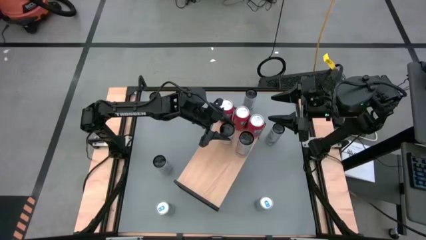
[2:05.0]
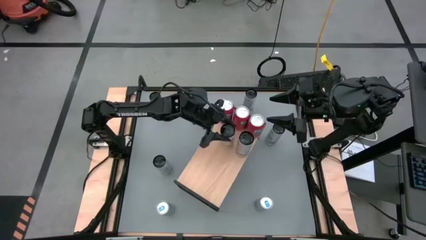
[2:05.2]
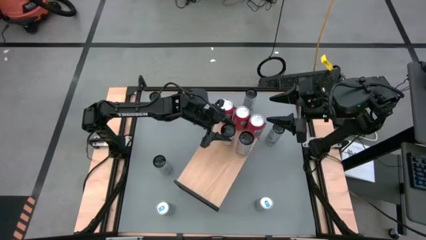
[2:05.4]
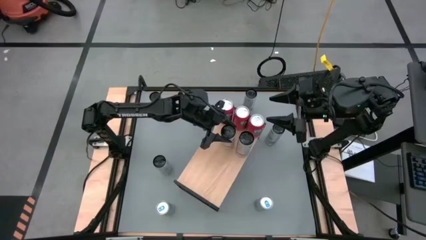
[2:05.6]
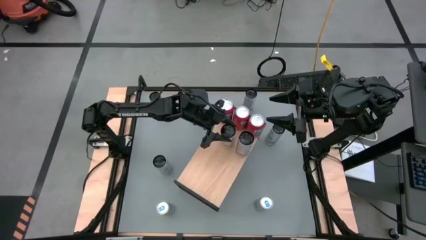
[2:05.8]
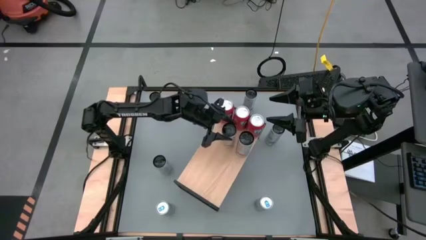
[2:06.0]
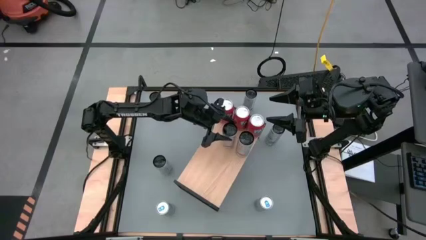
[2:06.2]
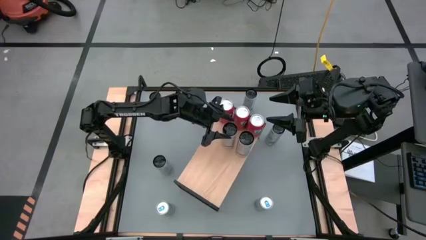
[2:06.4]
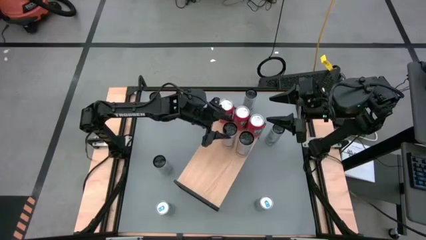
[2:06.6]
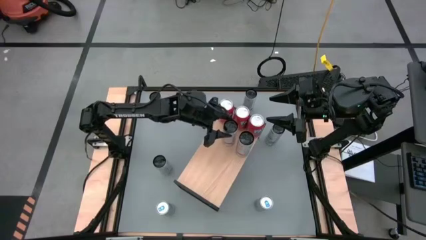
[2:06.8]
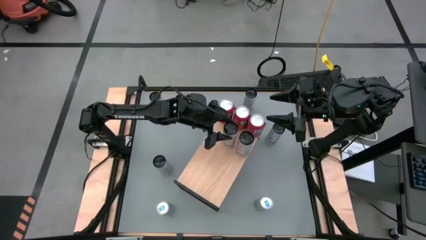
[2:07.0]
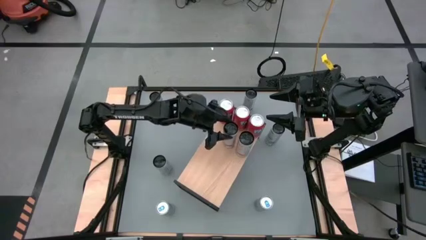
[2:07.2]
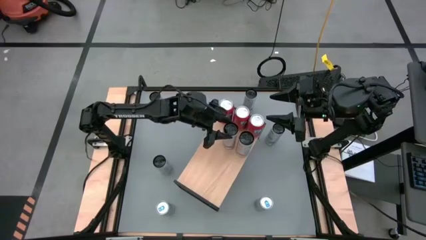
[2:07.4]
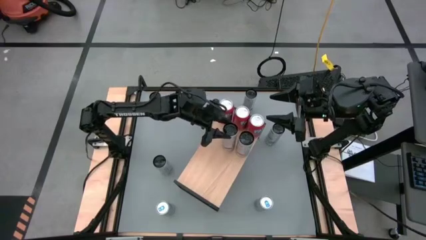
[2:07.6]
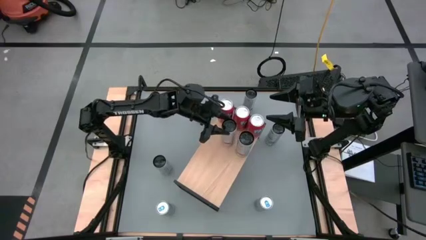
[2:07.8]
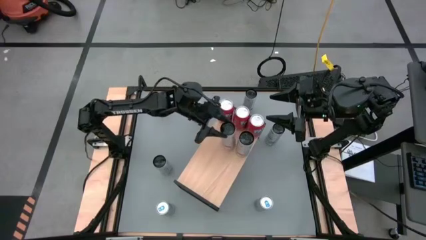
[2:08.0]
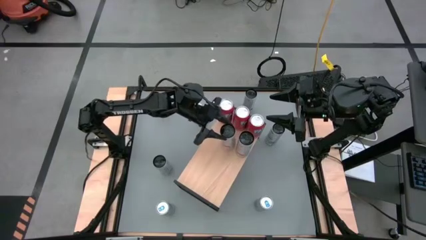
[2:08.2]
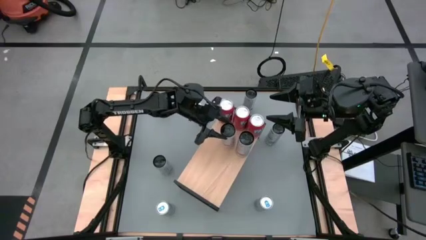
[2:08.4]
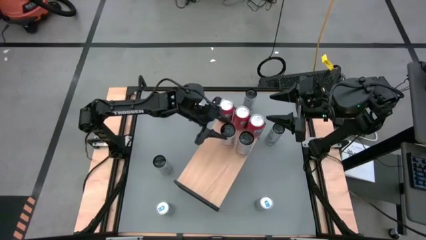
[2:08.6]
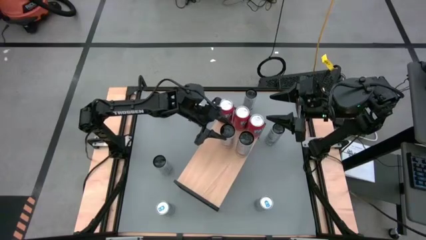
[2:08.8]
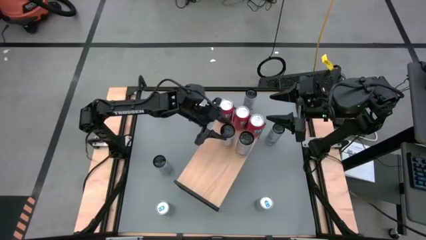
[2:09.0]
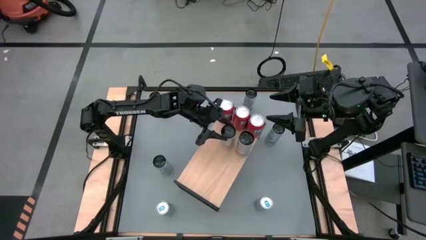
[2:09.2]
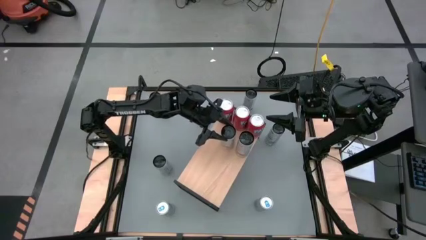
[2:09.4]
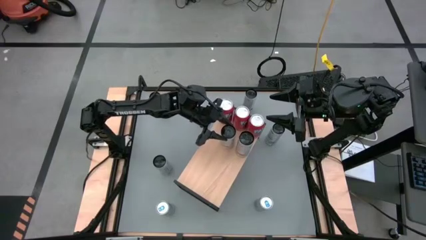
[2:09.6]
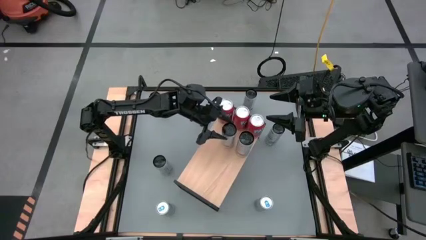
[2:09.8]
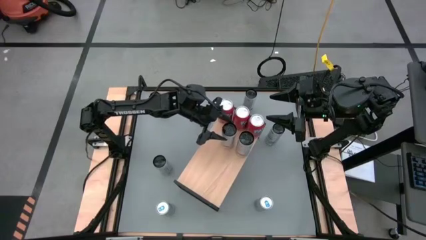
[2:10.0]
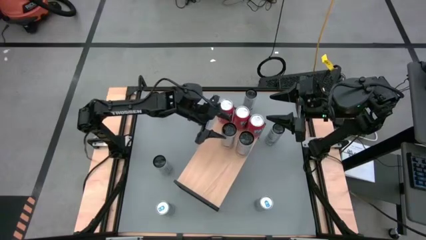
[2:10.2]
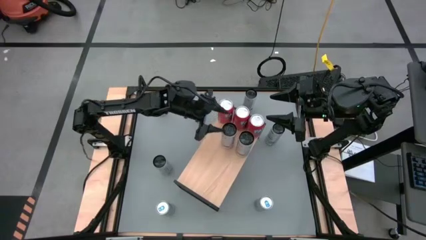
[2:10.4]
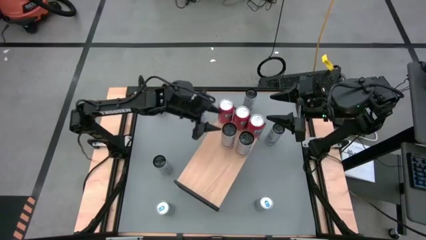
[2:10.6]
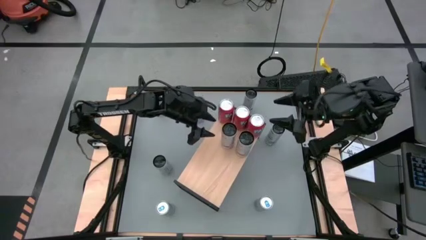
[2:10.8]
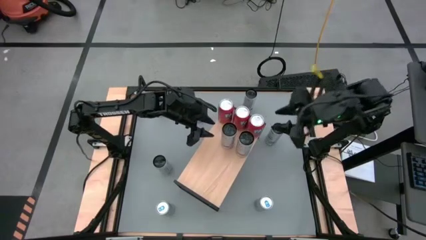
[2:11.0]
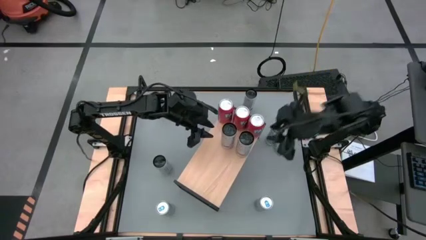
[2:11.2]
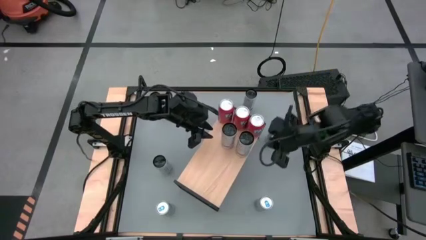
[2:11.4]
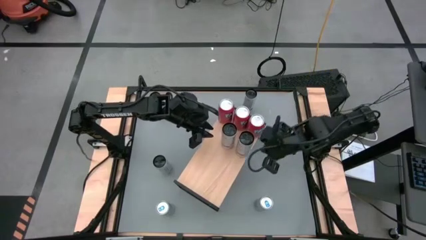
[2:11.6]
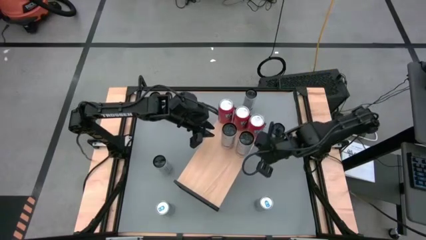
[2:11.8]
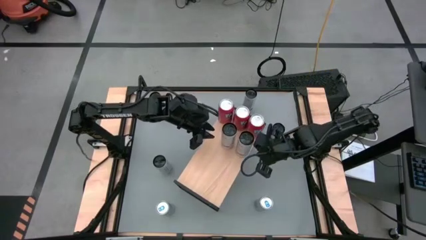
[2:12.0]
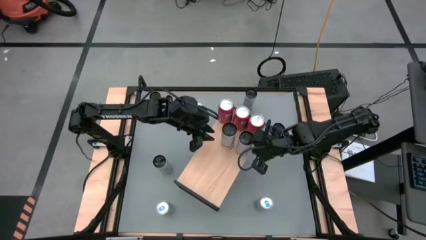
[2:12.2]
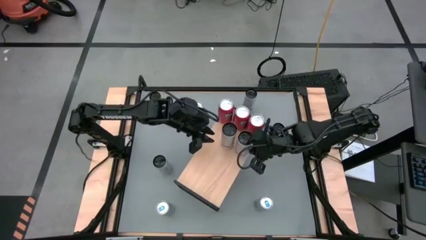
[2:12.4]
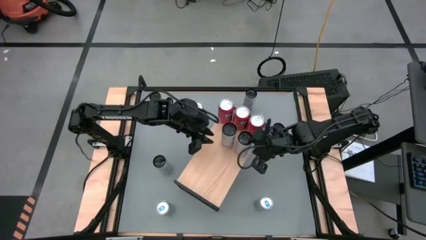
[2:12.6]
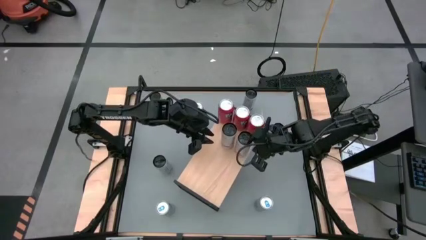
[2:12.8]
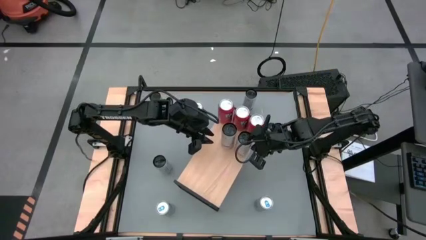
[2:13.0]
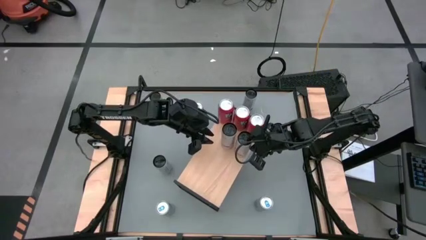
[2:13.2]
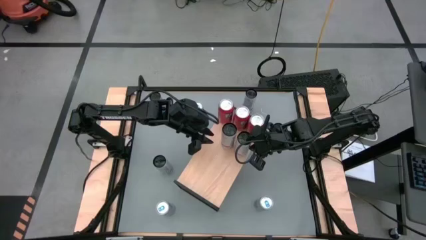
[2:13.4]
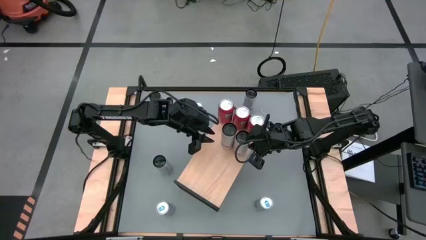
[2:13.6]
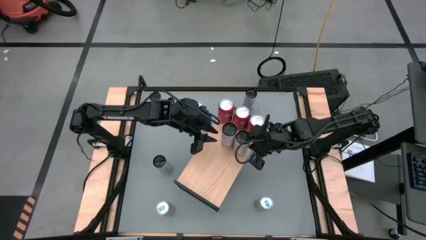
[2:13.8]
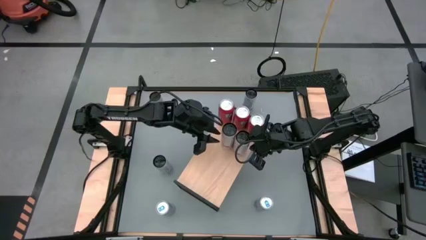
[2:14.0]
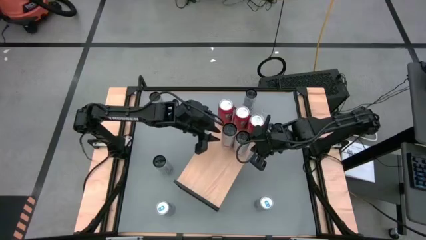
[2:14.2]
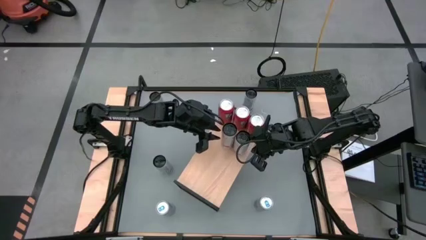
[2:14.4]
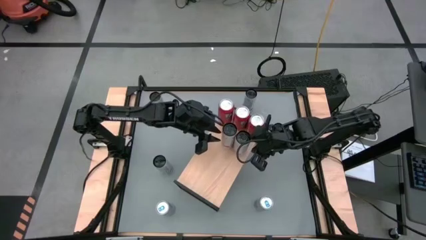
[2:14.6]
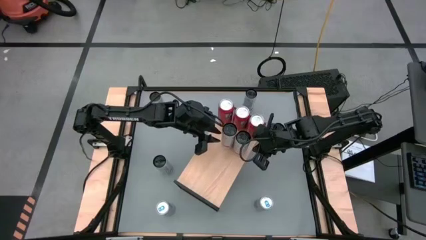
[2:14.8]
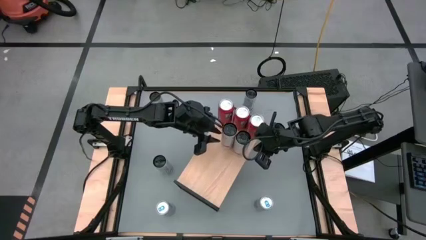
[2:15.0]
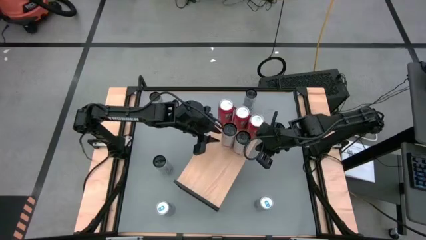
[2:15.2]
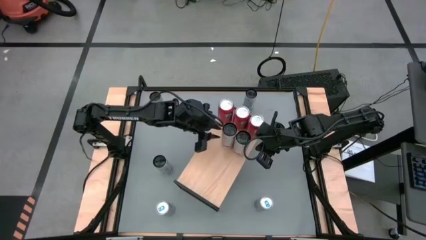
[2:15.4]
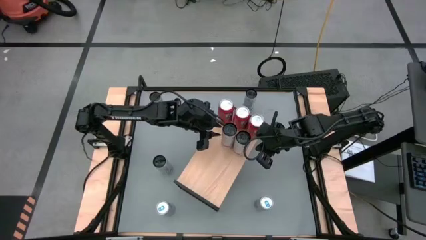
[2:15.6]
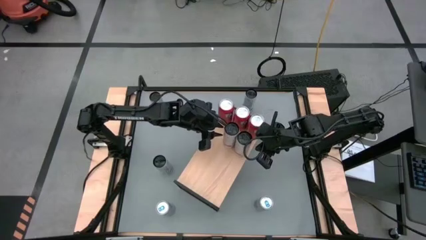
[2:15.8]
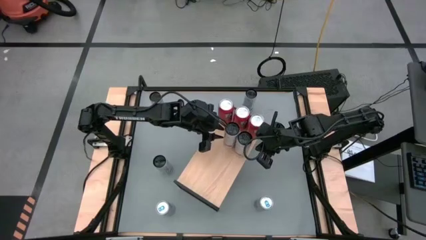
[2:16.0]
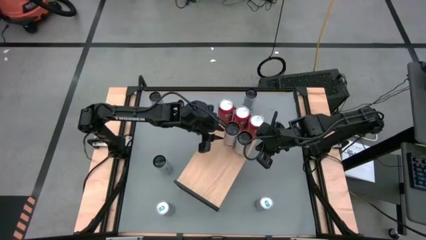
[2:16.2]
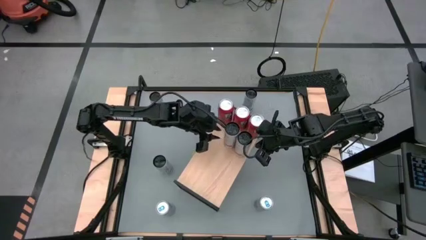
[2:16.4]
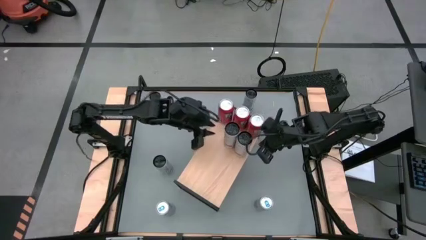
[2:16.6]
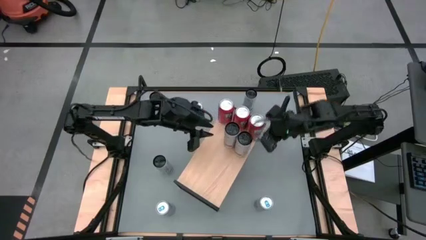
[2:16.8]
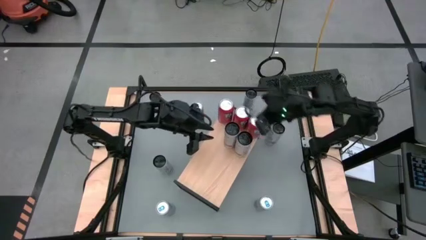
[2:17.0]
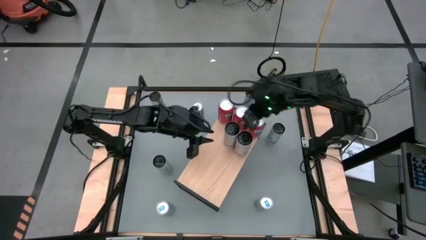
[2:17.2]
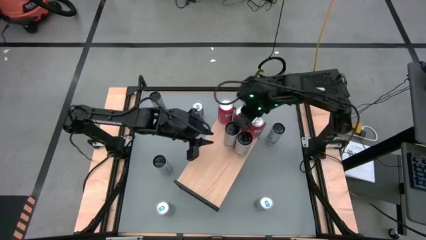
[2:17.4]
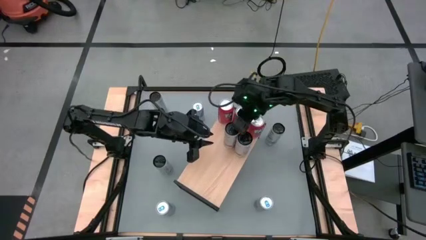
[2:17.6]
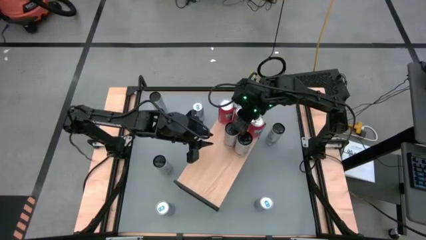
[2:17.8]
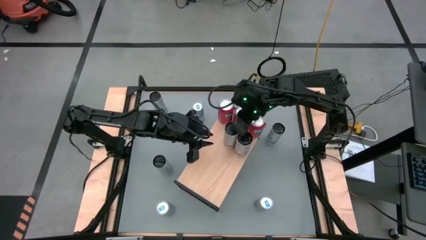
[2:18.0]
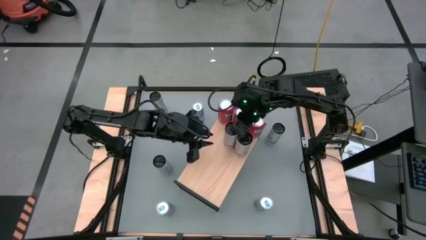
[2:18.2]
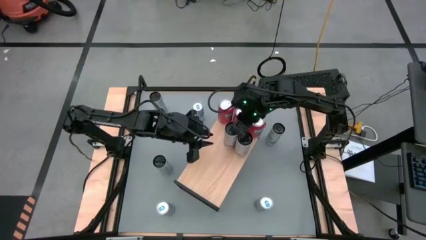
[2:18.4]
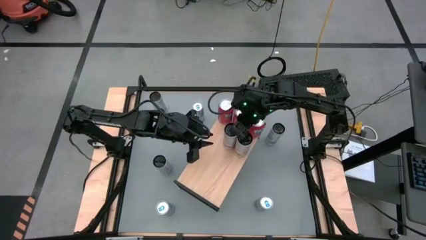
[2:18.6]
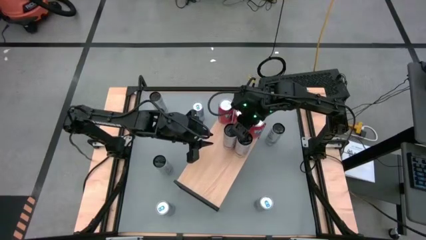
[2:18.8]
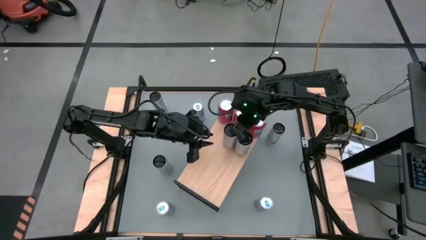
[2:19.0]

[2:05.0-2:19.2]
Task: Place canned beverage on shelf
Put the white pink soda can on the shelf aligned with the other white pink soda can

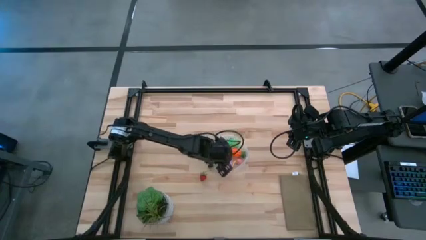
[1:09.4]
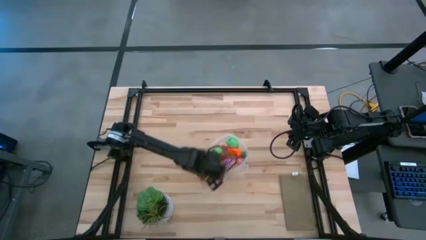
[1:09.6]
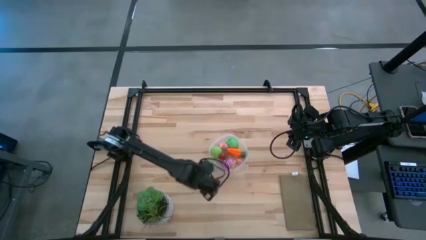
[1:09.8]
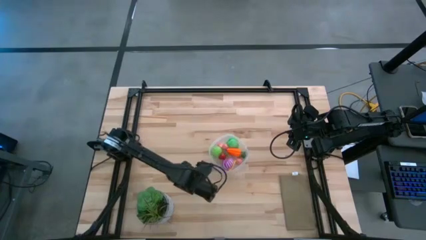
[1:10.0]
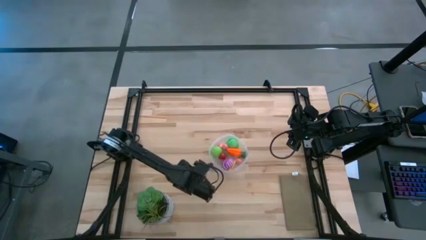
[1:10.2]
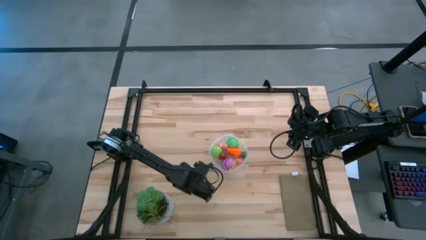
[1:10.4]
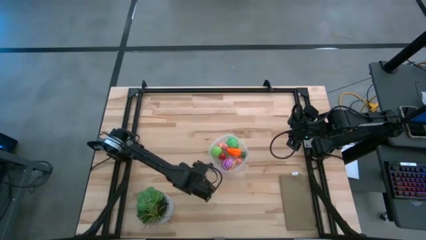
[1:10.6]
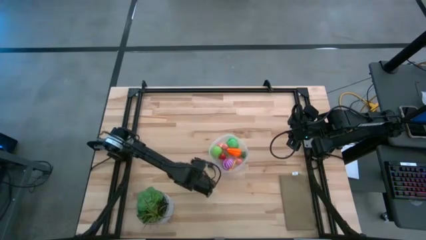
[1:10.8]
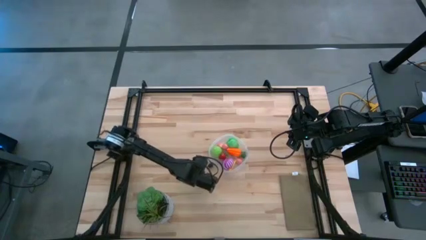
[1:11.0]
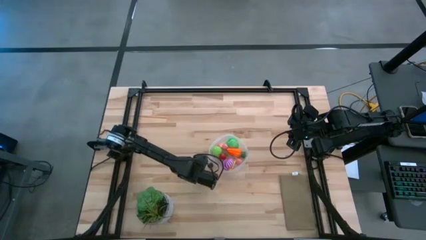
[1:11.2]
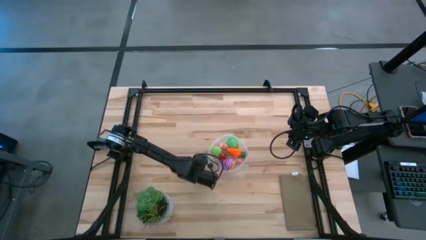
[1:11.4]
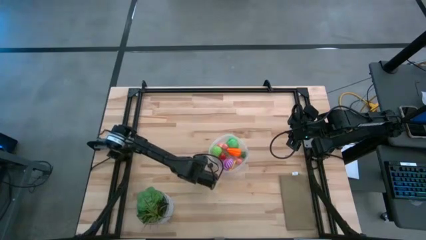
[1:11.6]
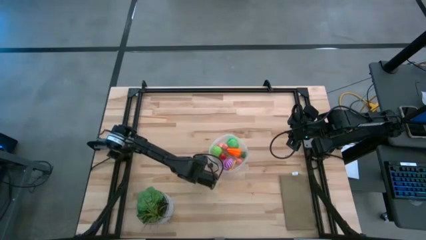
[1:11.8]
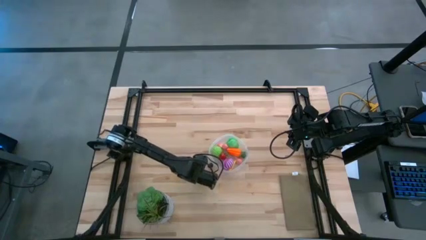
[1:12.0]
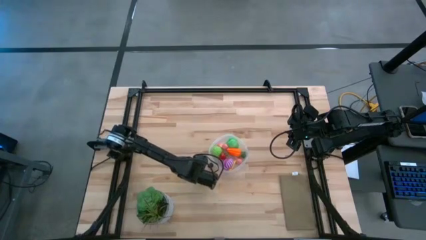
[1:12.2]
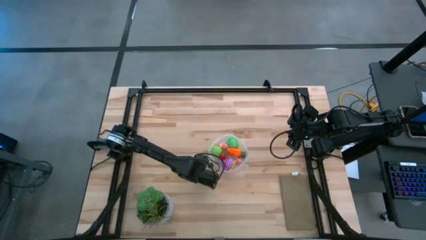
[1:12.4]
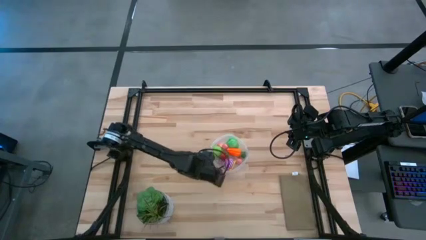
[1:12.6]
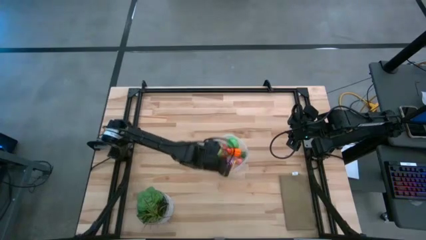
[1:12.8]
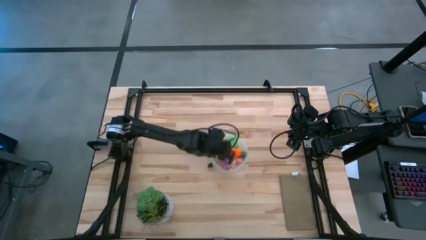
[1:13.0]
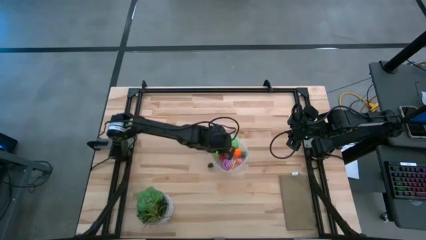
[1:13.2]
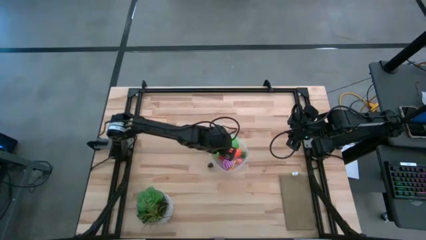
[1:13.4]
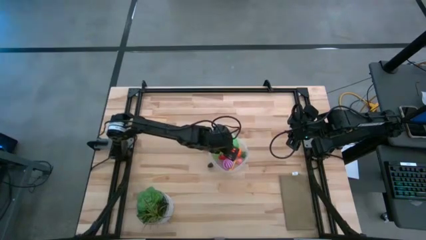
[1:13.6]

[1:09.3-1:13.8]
Task: Pick and placing Produce into tupperware
Put the red strawberry into the transparent bin
